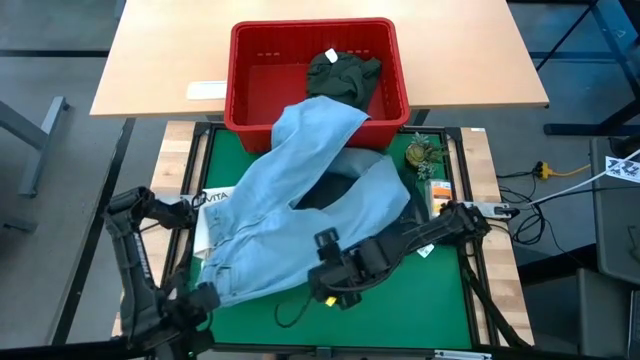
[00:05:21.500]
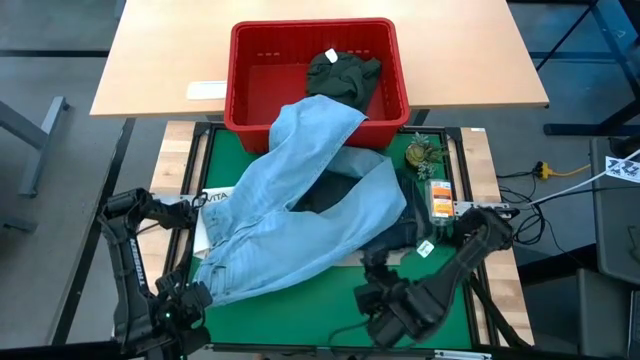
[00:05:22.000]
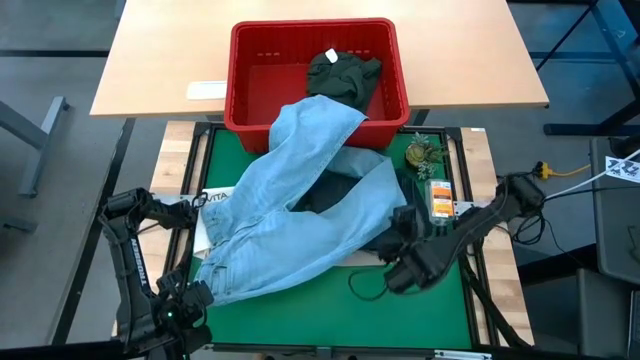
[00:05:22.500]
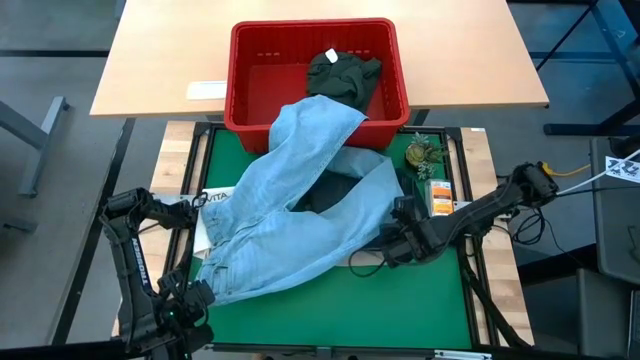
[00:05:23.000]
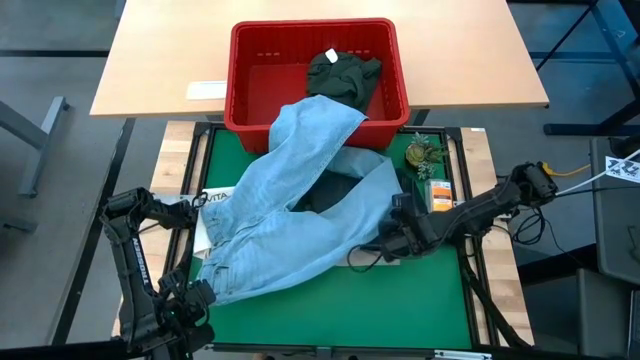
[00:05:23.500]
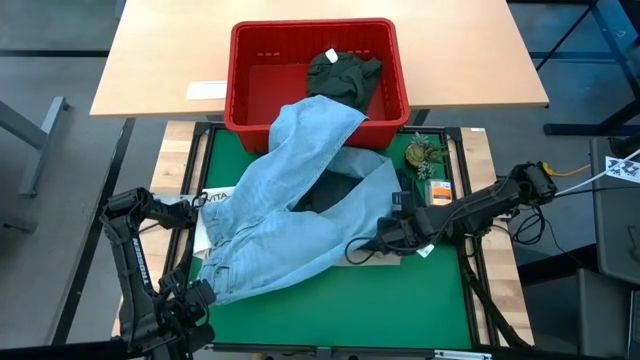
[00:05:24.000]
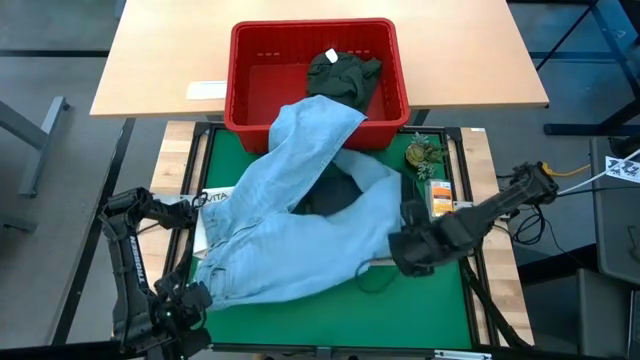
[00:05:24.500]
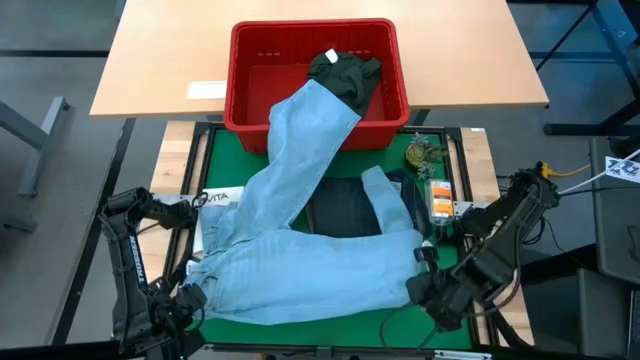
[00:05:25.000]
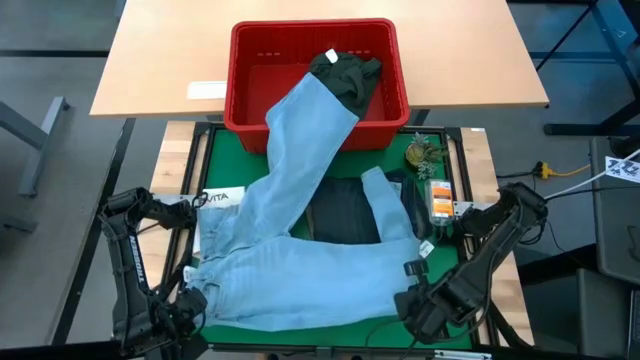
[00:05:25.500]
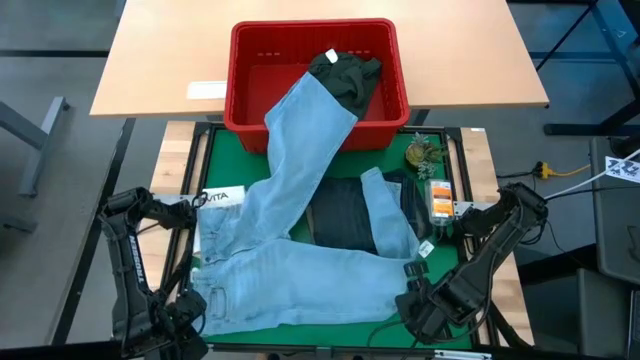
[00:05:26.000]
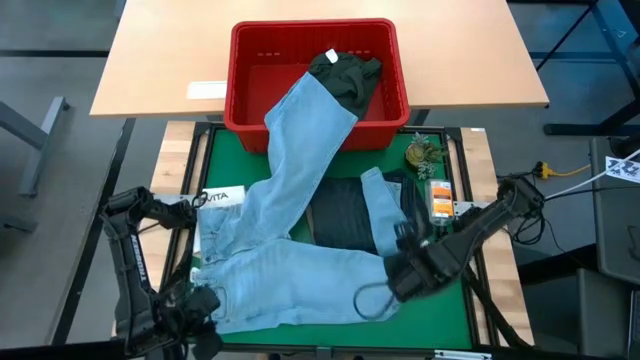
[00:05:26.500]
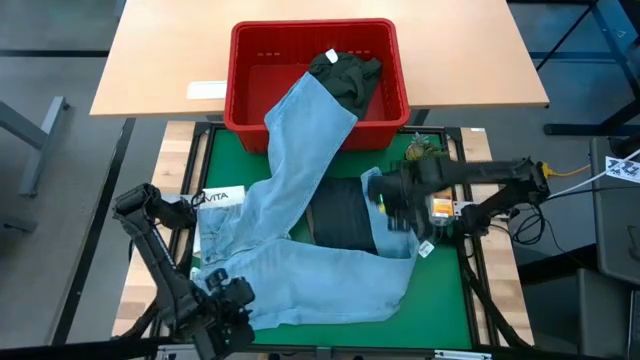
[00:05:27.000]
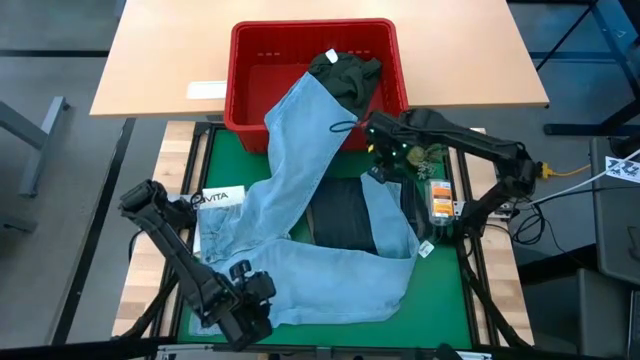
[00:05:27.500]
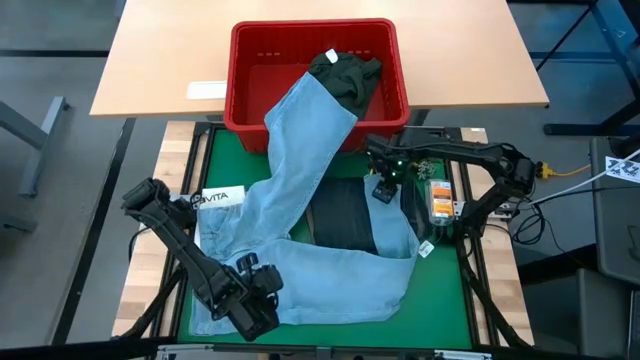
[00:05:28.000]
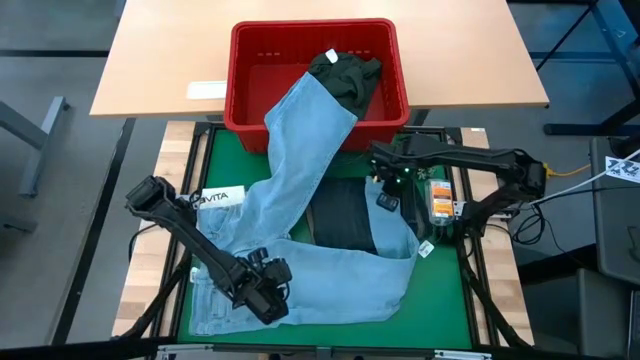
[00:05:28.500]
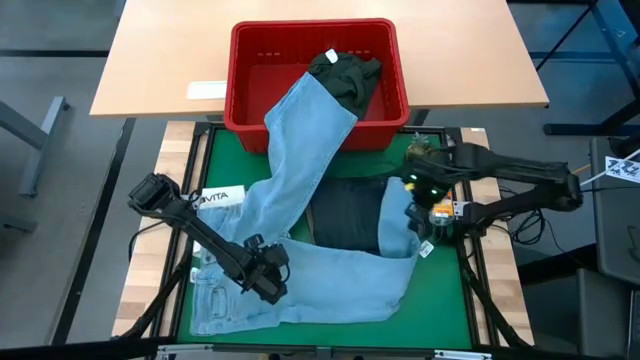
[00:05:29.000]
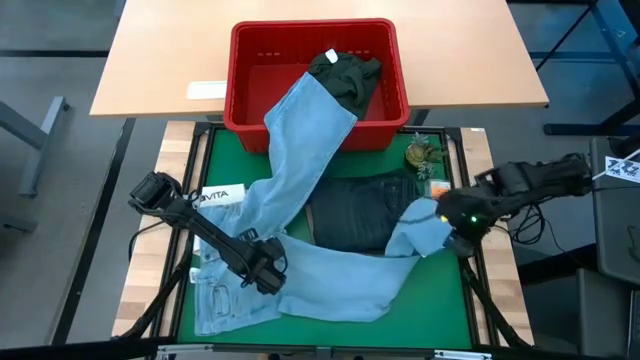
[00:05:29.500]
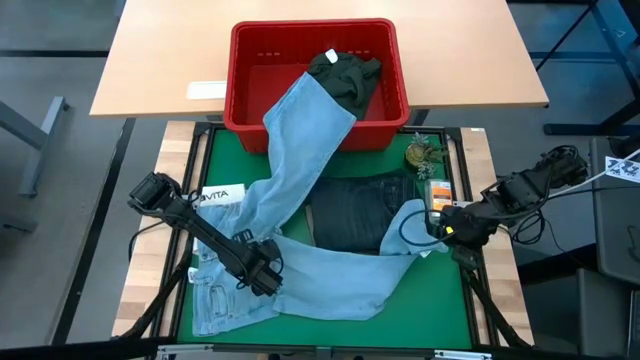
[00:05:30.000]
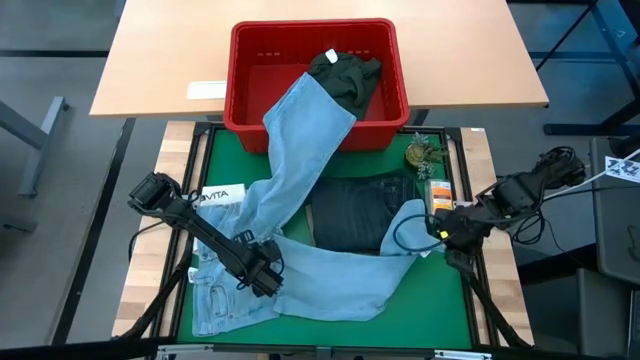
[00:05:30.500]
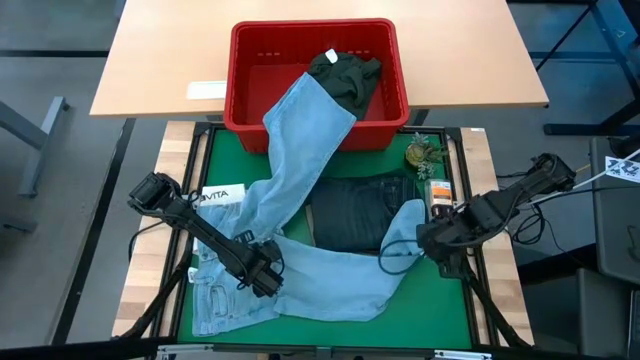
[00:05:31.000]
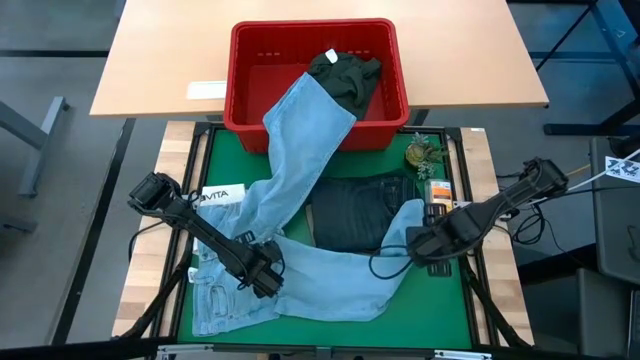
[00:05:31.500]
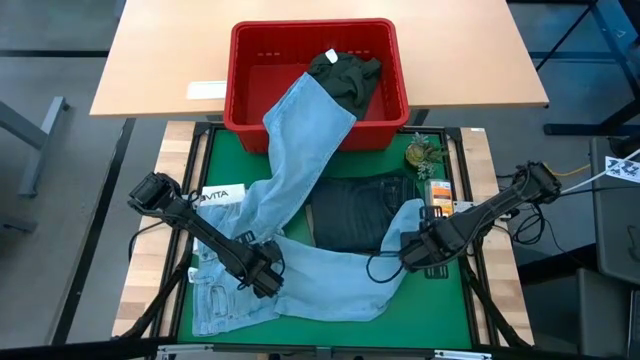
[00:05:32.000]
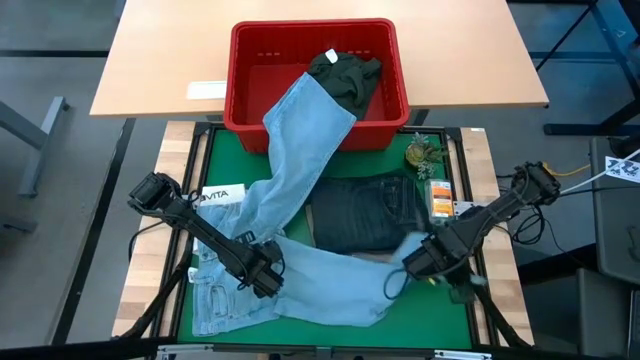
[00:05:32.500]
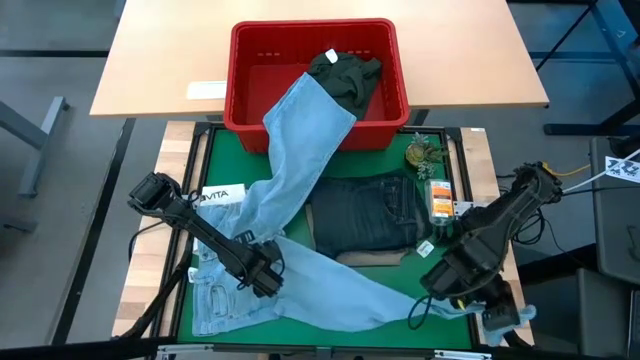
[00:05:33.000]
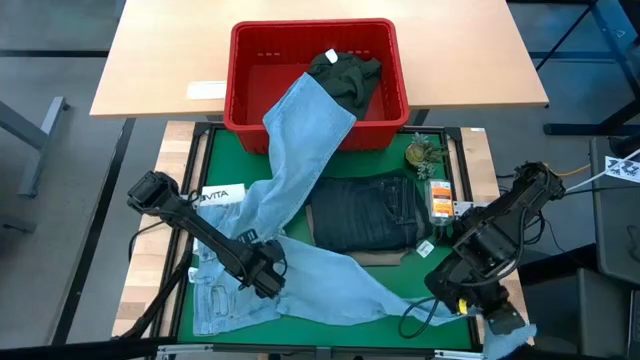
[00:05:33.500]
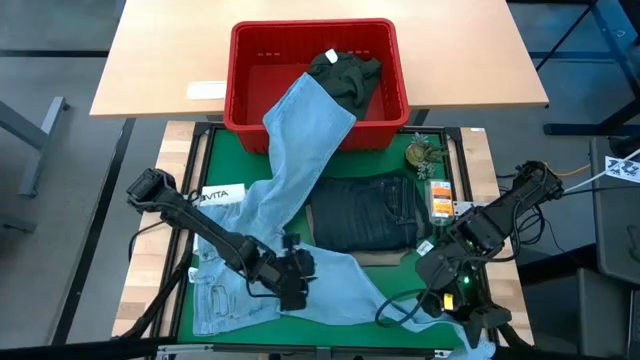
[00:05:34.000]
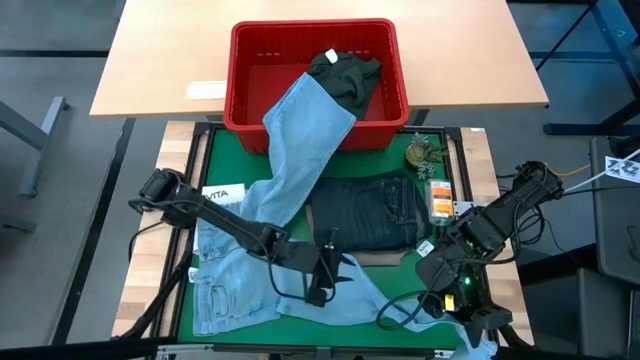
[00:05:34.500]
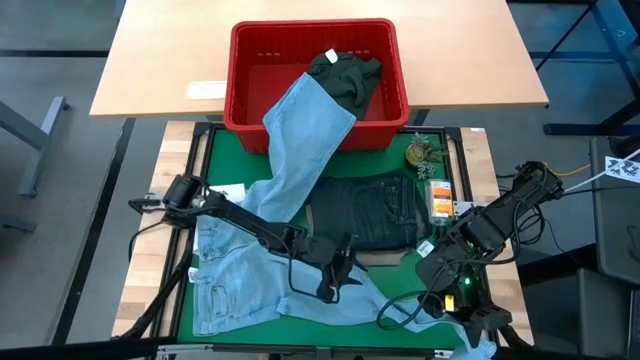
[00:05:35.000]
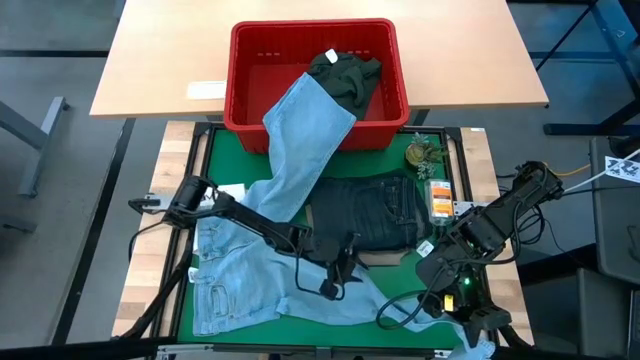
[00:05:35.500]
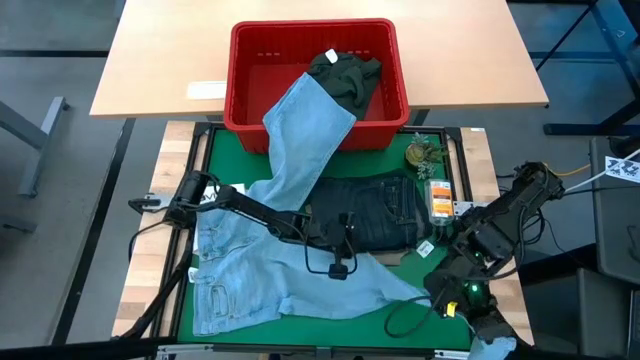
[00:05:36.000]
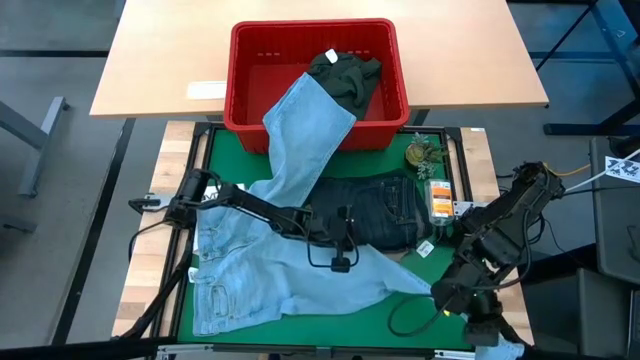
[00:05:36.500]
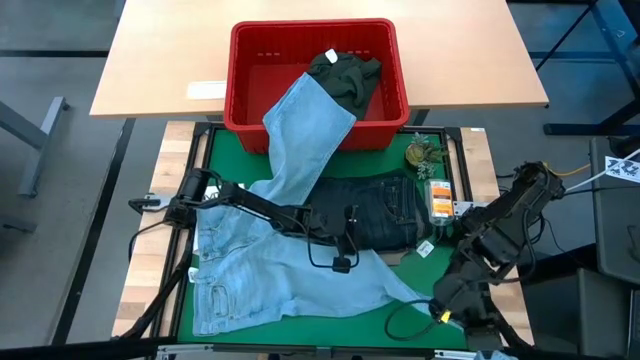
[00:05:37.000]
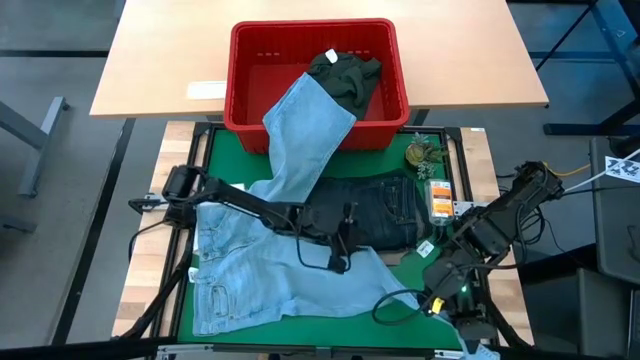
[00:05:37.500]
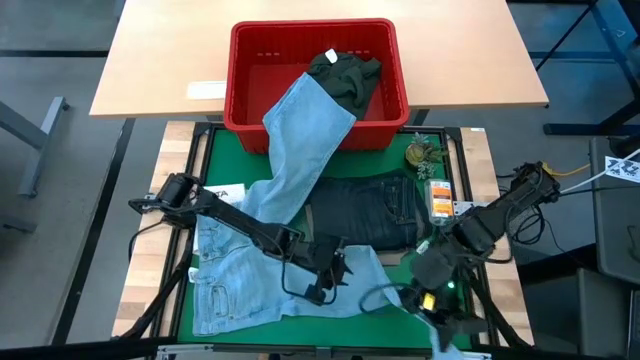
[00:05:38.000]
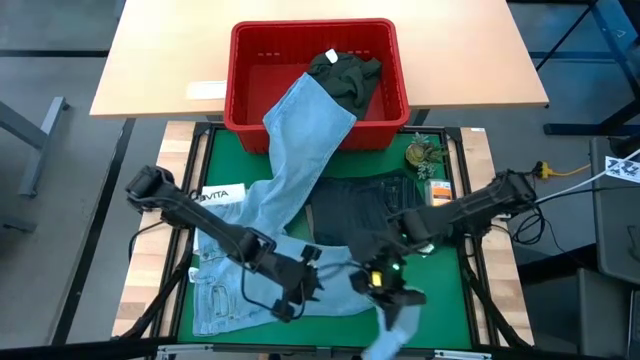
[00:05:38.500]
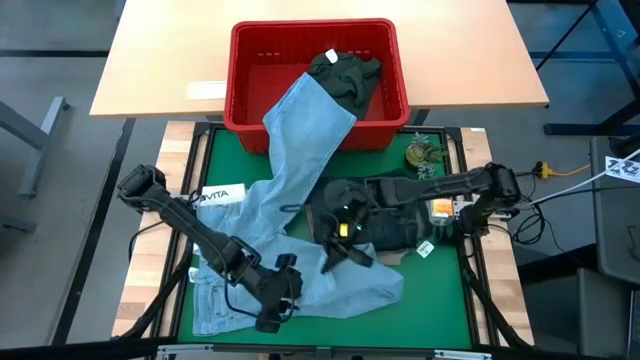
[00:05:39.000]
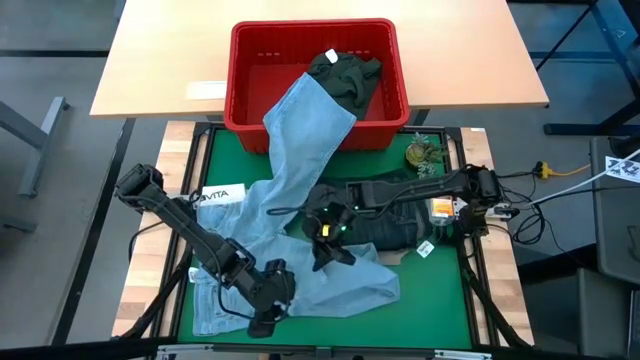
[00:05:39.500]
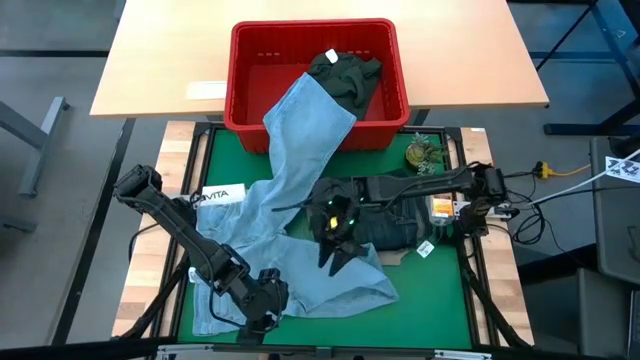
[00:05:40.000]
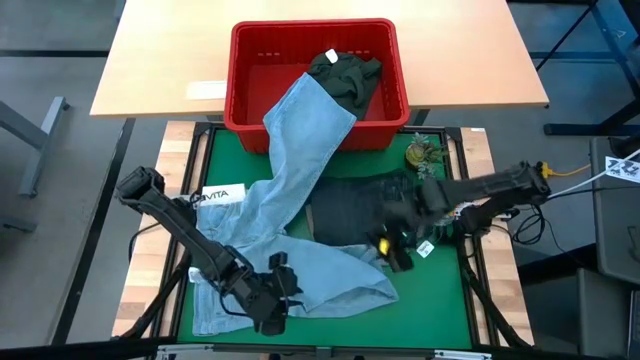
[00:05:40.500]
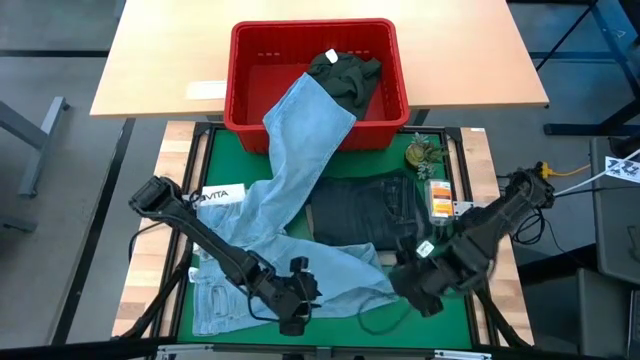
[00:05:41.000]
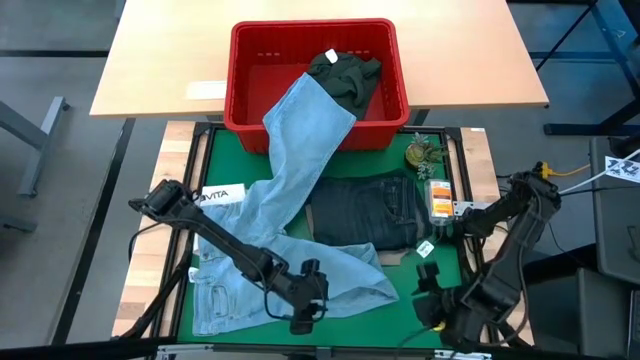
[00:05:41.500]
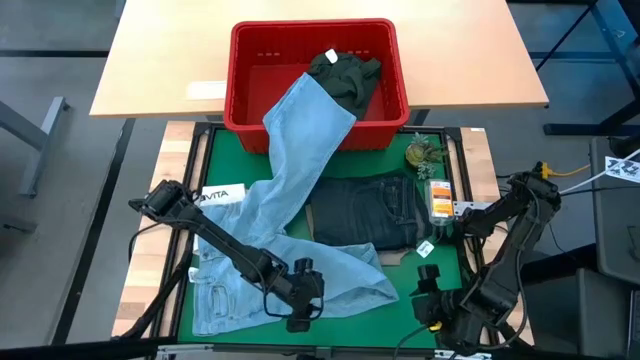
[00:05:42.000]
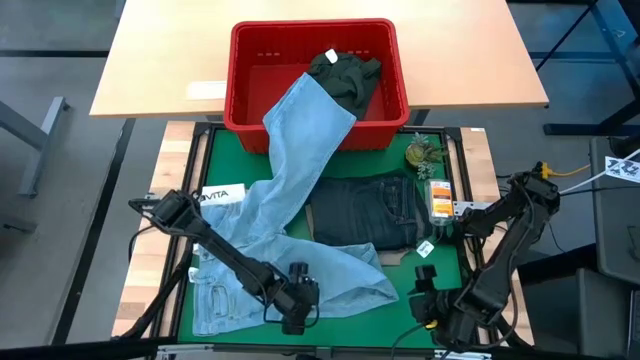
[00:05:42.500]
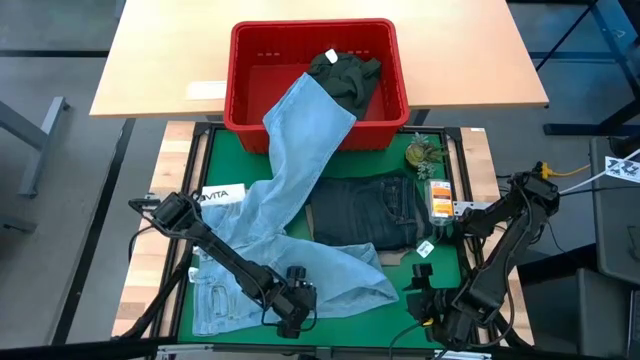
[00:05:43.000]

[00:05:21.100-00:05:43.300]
Task: Fold Laundry from Bin
Fold the light blue jeans
